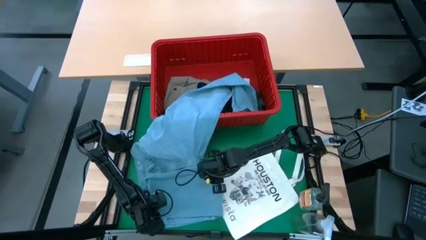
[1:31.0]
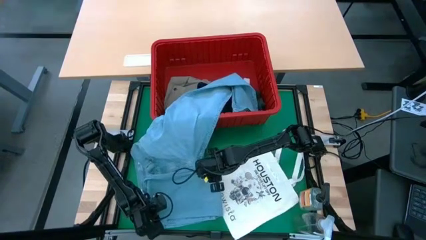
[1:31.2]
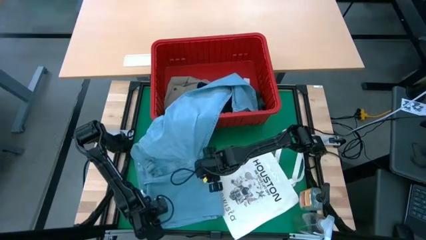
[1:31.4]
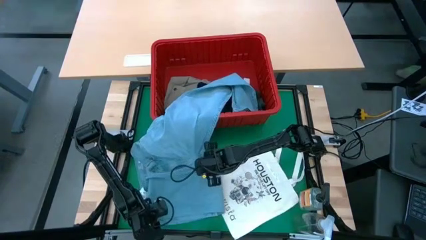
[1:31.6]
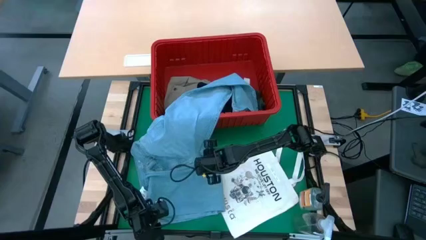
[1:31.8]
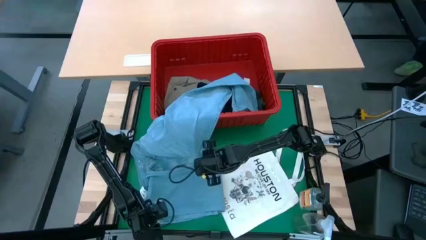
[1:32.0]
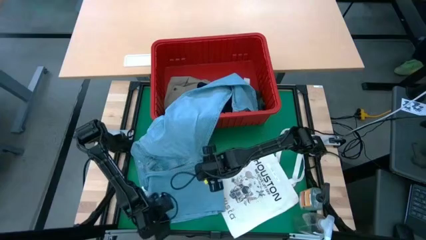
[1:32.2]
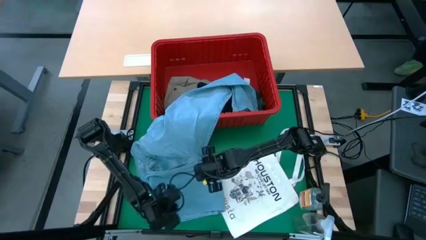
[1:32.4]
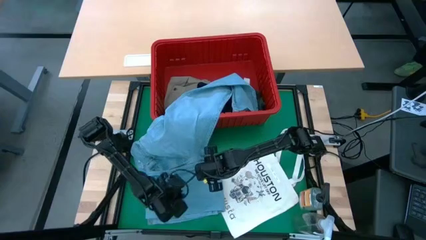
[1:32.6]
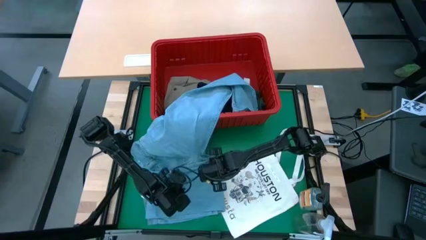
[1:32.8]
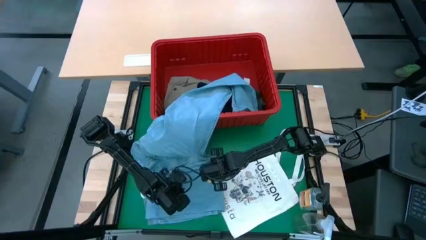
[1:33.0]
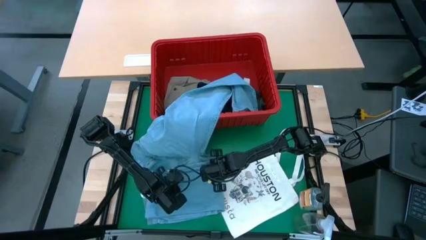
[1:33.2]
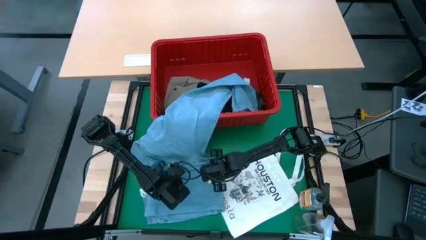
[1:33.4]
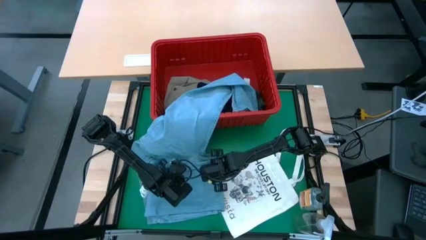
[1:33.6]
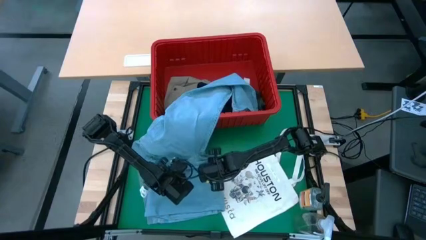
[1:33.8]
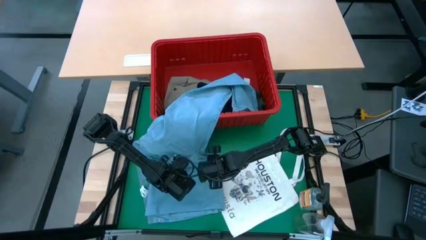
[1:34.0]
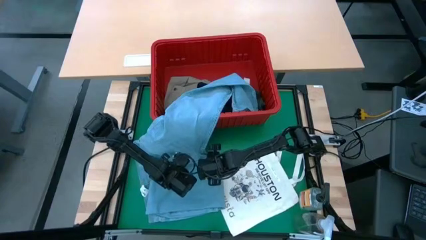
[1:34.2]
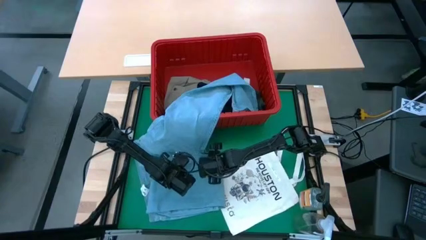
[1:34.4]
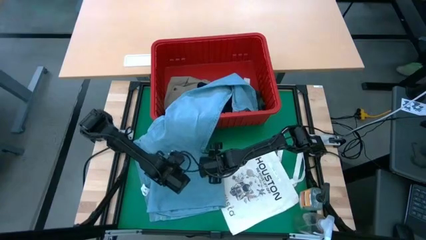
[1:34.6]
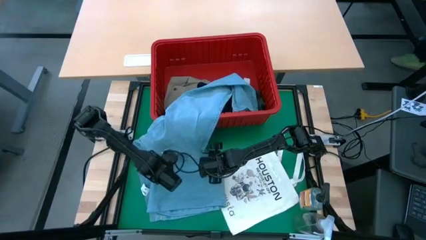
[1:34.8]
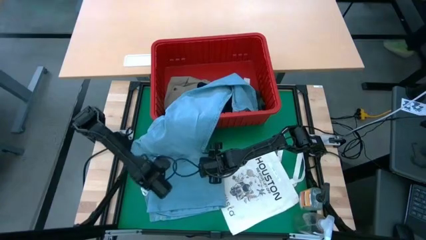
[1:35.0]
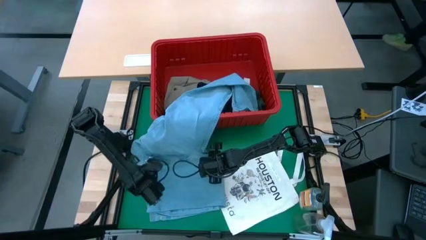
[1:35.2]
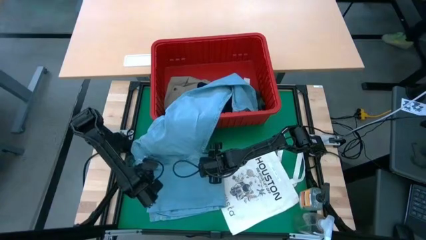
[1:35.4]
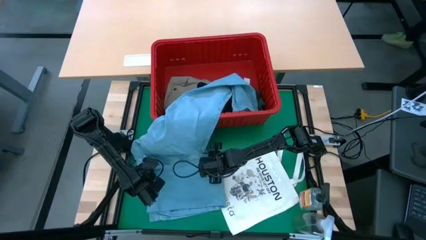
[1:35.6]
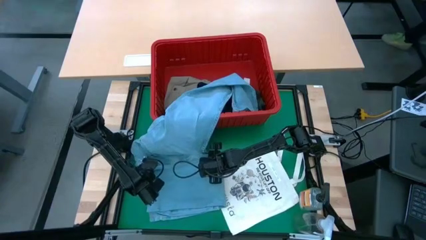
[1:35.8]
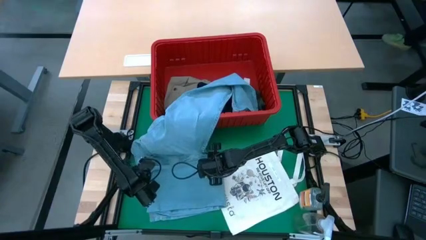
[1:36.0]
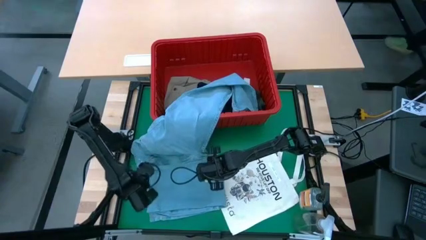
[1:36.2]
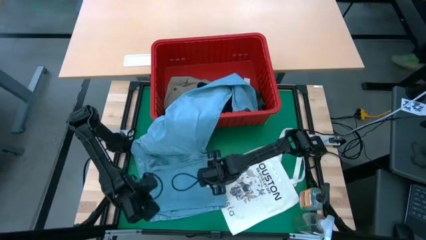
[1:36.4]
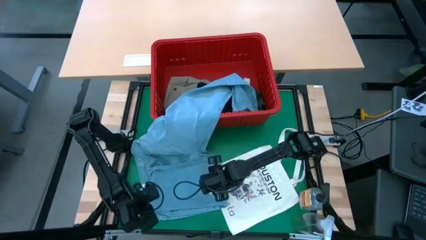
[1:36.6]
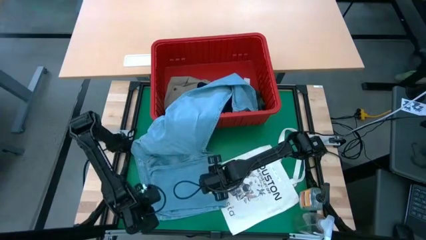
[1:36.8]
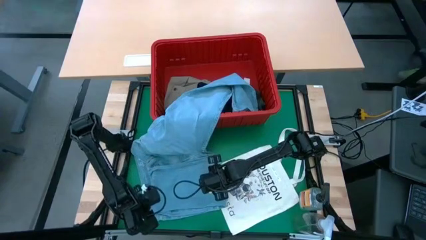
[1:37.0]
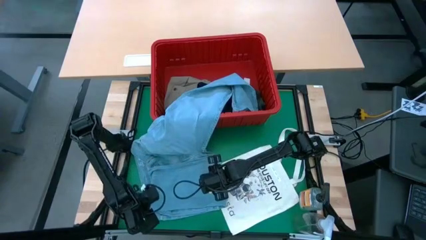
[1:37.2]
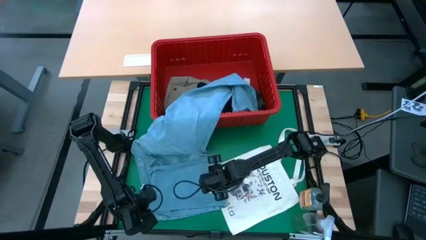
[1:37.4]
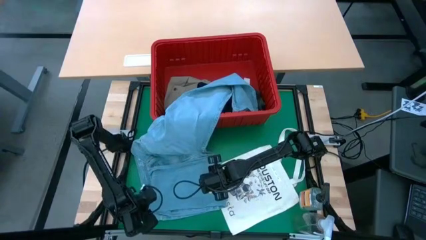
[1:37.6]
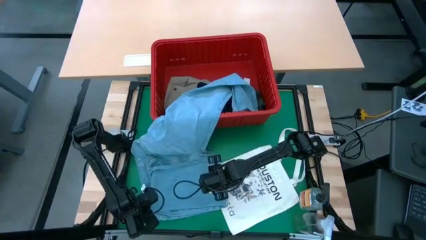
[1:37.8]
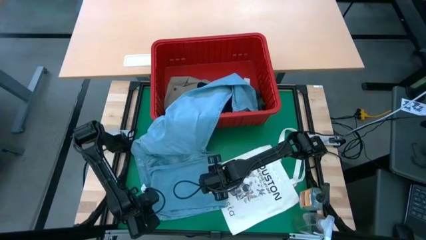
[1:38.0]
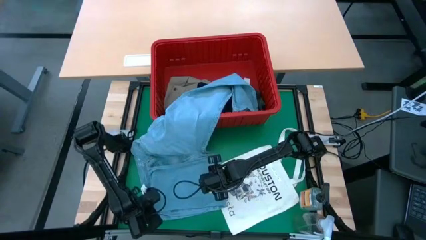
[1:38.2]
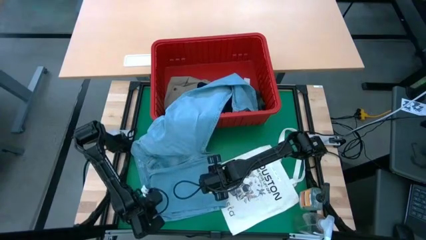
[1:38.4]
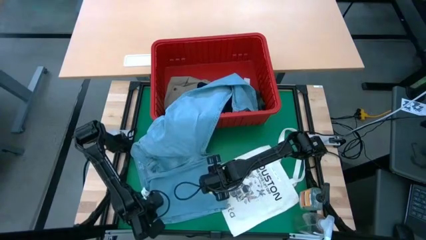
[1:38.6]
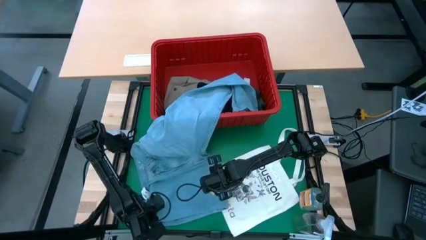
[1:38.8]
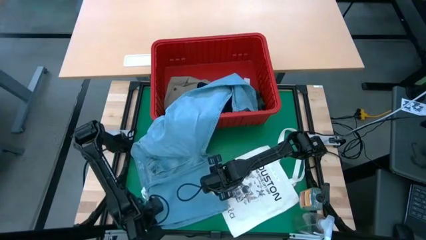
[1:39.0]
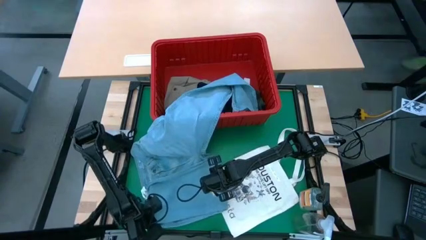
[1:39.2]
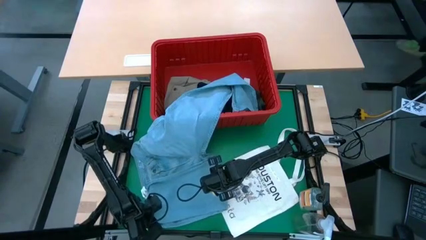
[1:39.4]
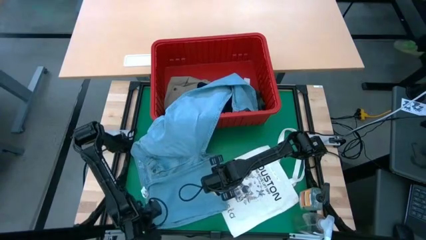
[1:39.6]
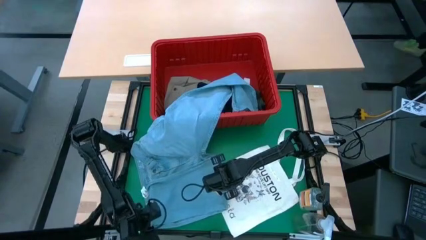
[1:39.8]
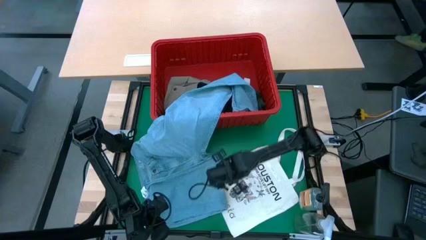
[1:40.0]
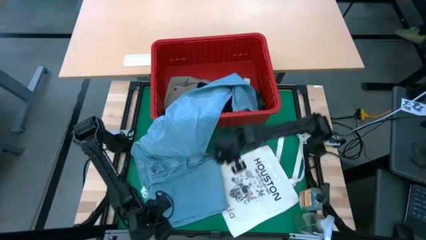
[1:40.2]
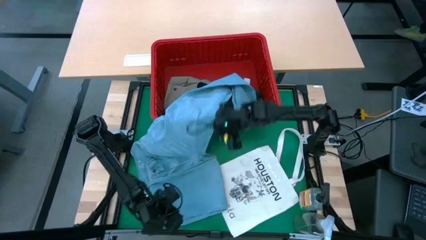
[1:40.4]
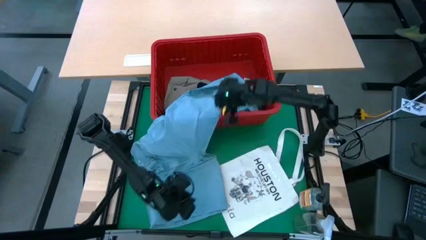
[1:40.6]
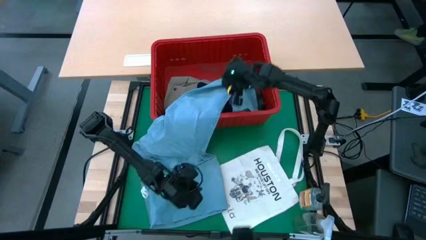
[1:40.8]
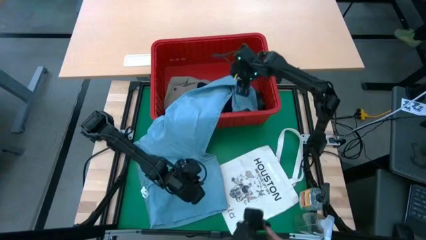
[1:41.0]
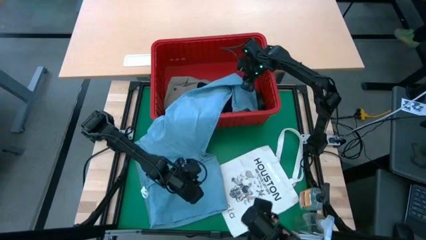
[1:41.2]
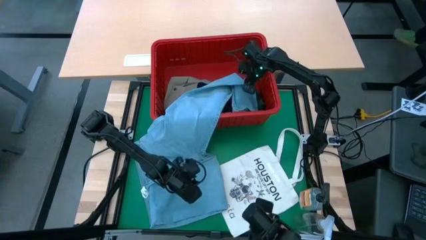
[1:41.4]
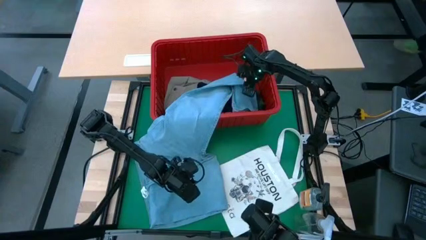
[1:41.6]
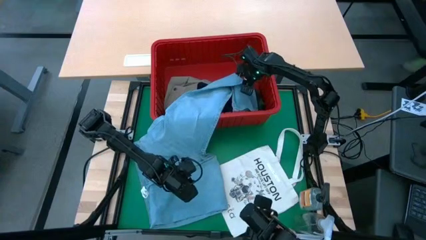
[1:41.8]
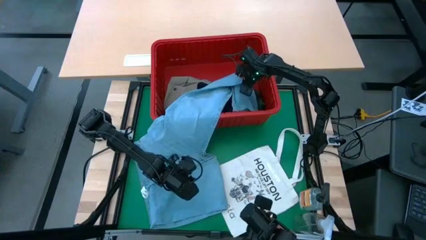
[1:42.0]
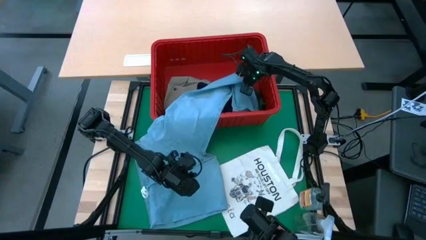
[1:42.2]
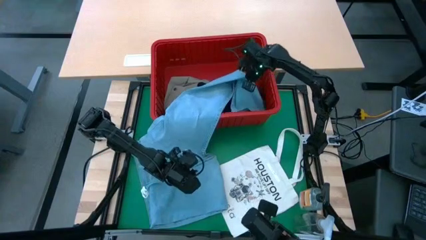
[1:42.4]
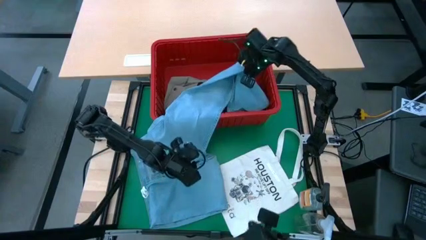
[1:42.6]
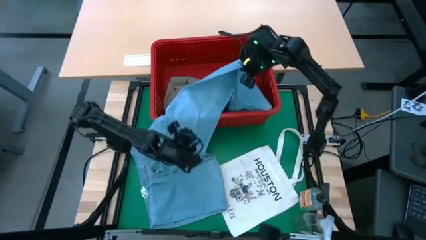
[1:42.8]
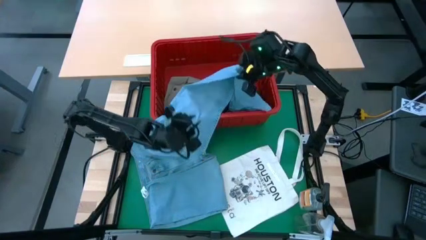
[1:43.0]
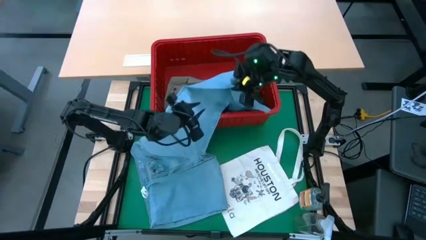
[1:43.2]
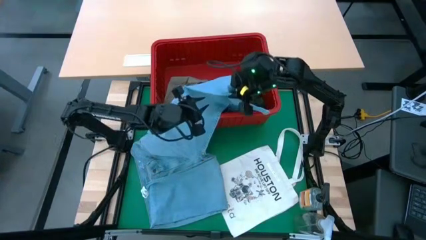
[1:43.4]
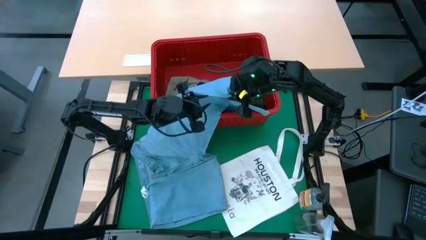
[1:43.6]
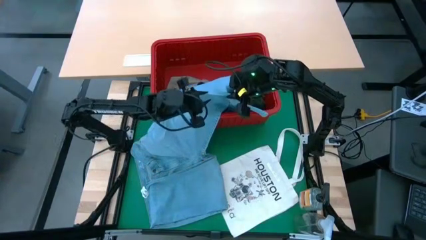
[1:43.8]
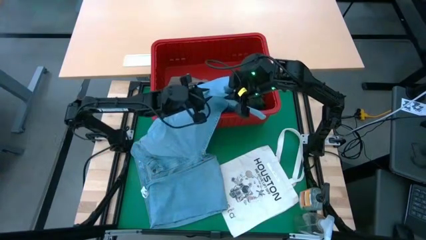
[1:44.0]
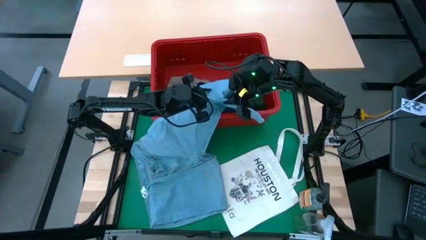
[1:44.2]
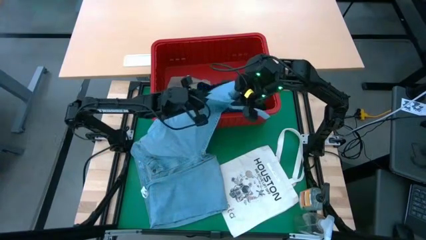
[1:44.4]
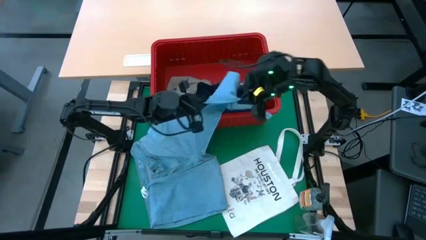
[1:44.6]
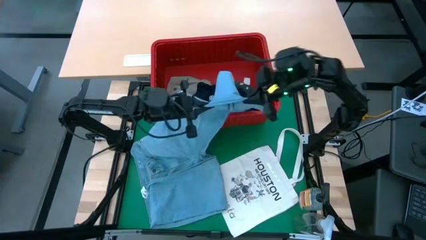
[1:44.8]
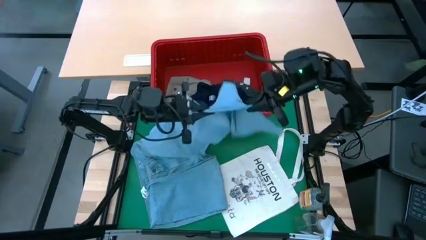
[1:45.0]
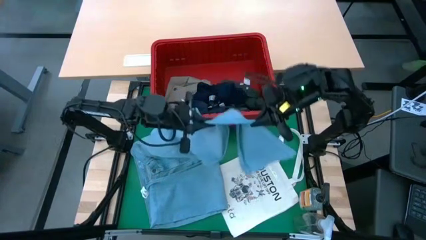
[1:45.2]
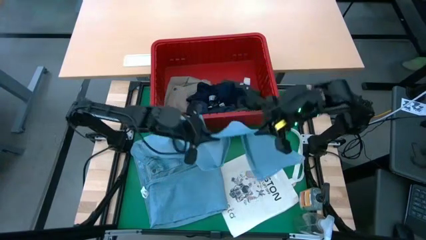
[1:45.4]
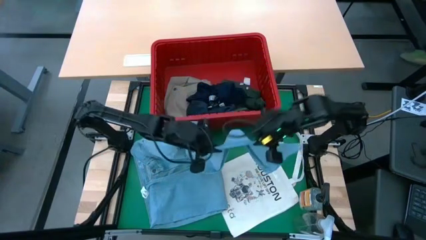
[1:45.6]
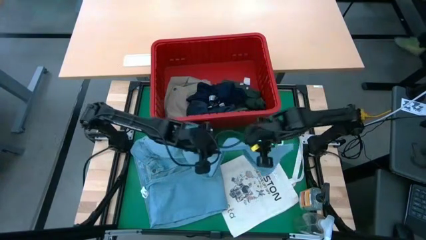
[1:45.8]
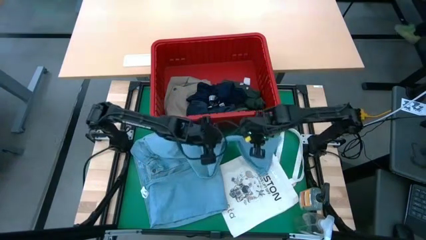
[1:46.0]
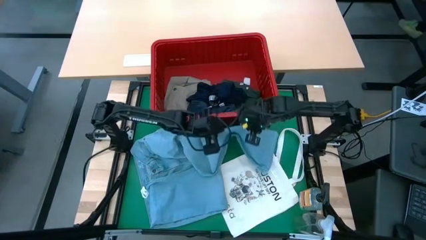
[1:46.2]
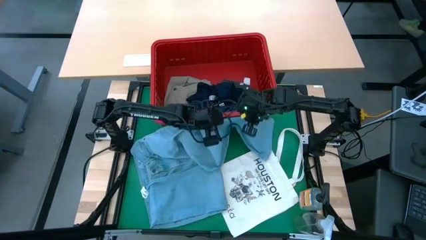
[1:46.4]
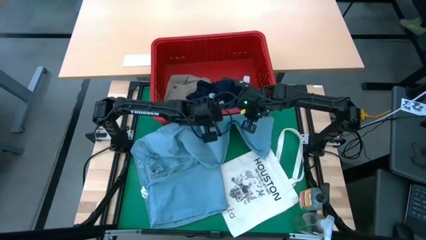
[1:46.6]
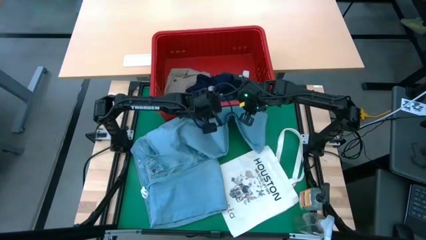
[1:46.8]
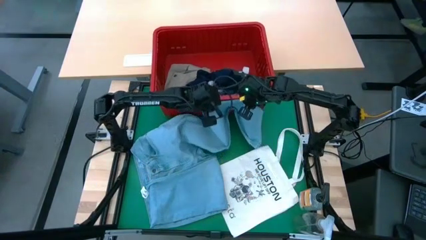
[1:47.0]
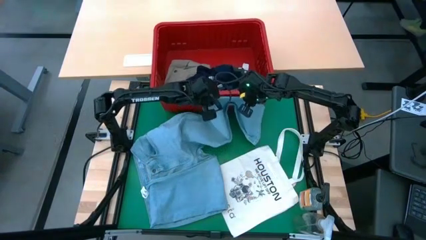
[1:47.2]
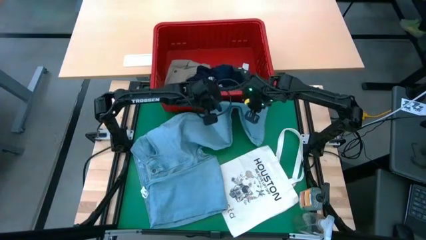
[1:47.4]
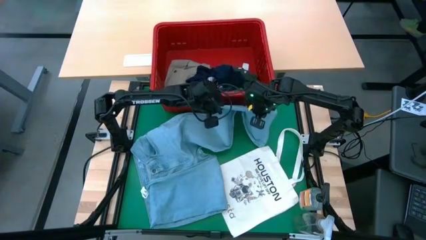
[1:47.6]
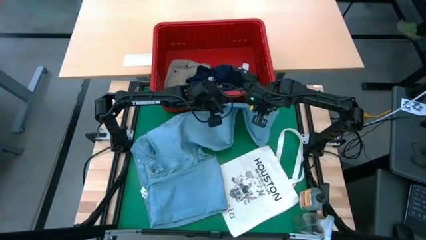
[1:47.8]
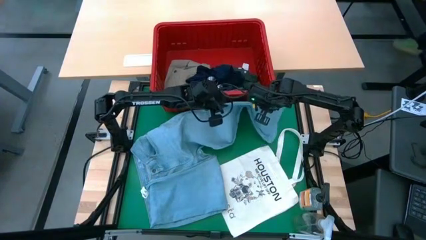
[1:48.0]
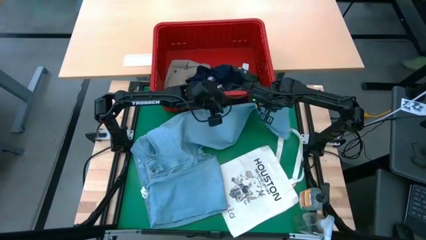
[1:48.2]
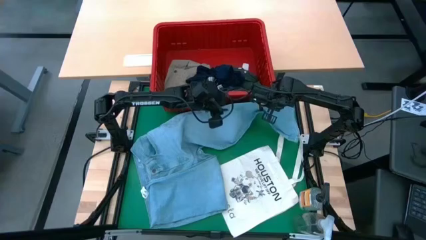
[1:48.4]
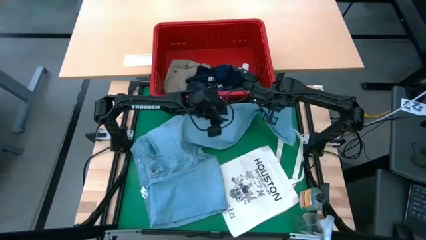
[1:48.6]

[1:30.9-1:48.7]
Task: Fold Laundry from Bin
Fold the blue jeans
